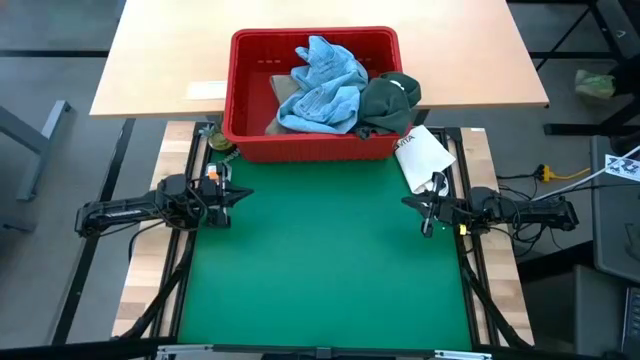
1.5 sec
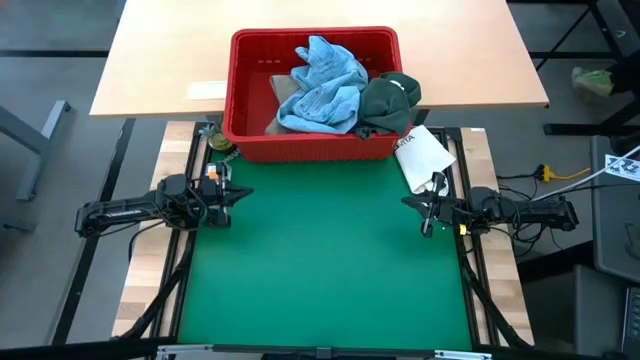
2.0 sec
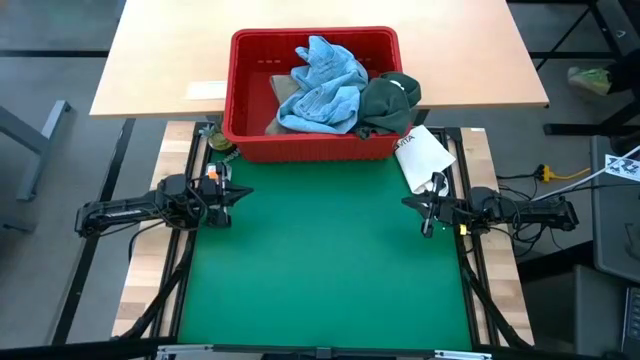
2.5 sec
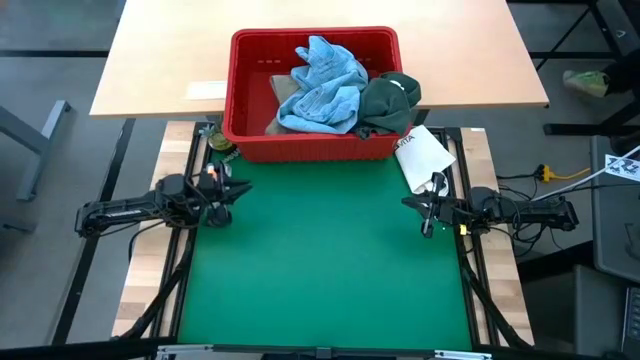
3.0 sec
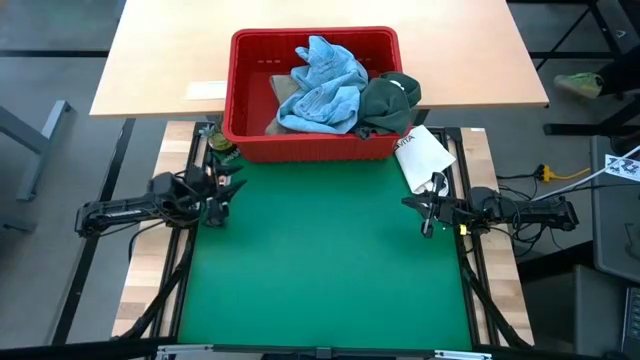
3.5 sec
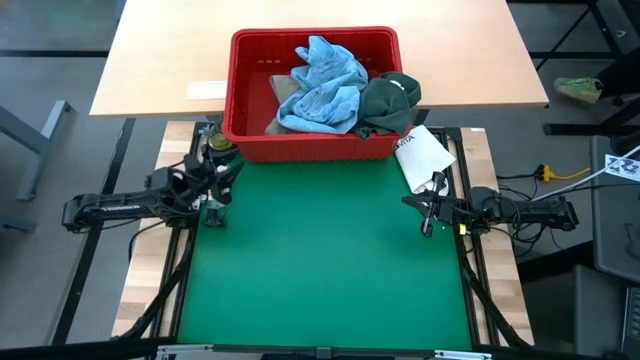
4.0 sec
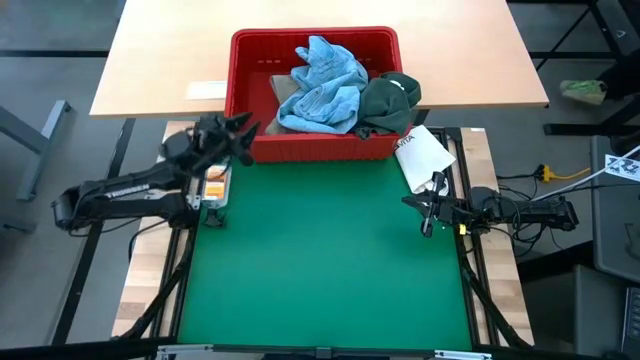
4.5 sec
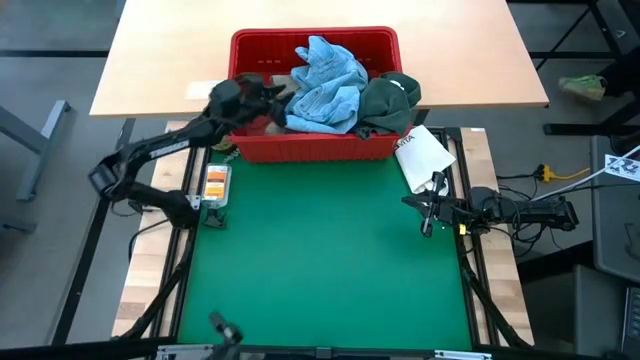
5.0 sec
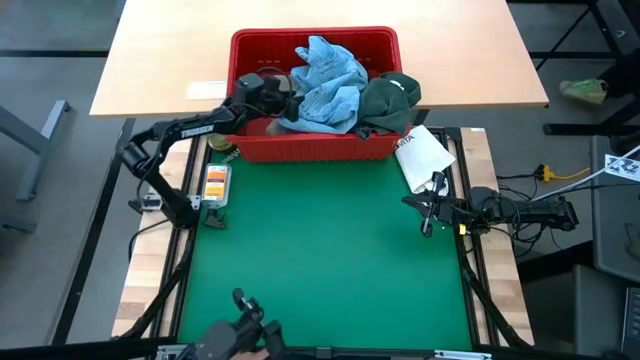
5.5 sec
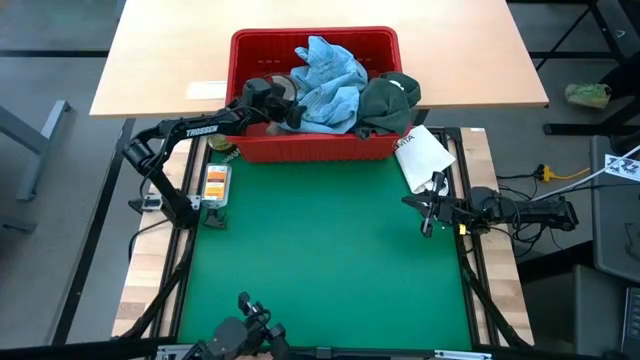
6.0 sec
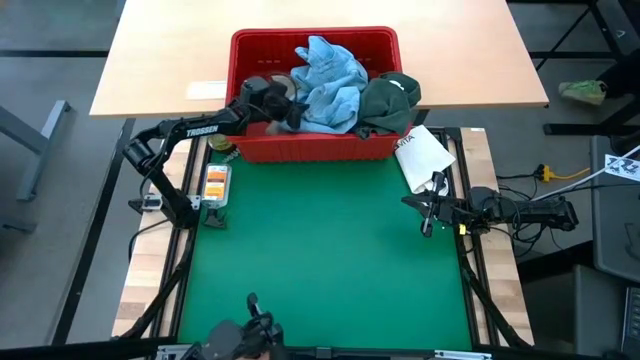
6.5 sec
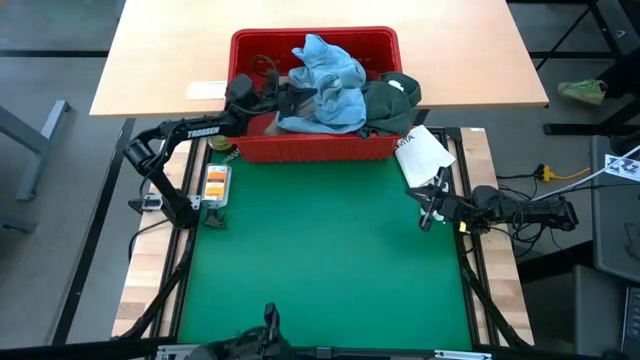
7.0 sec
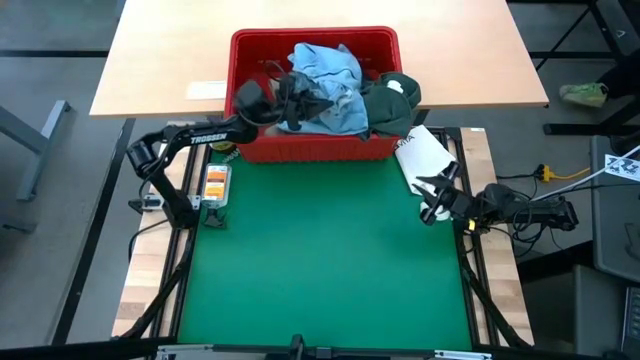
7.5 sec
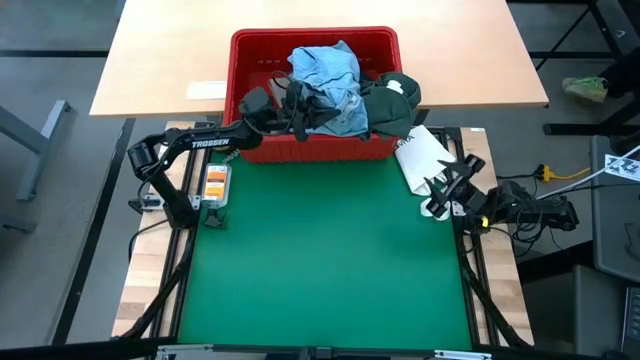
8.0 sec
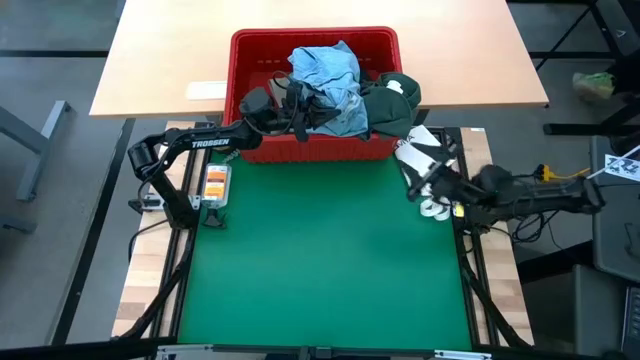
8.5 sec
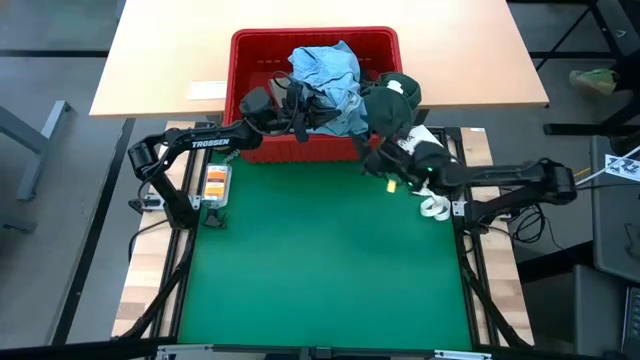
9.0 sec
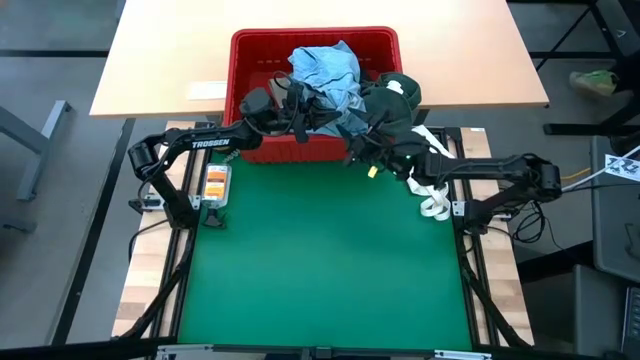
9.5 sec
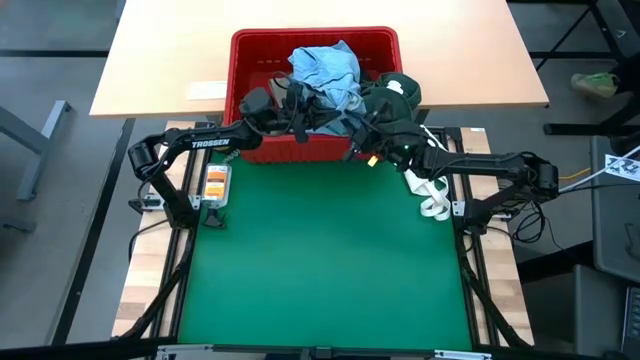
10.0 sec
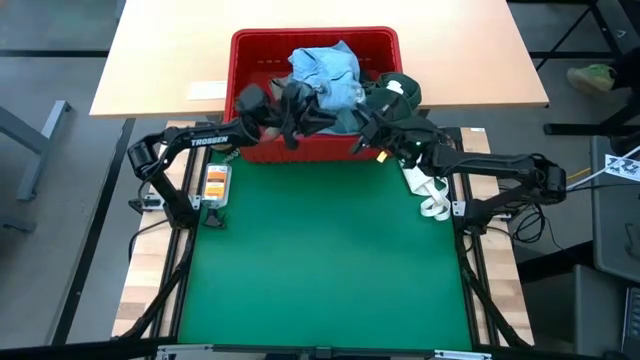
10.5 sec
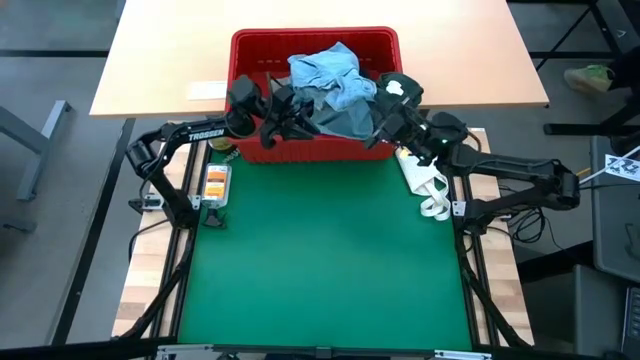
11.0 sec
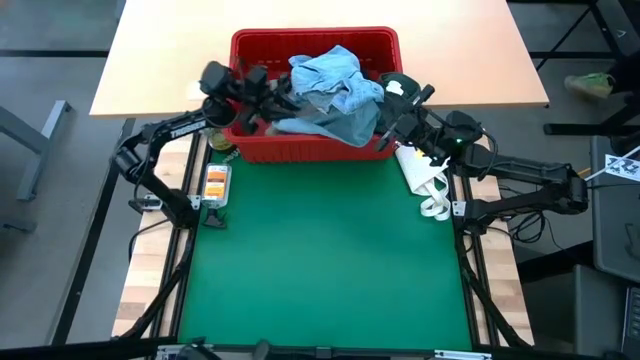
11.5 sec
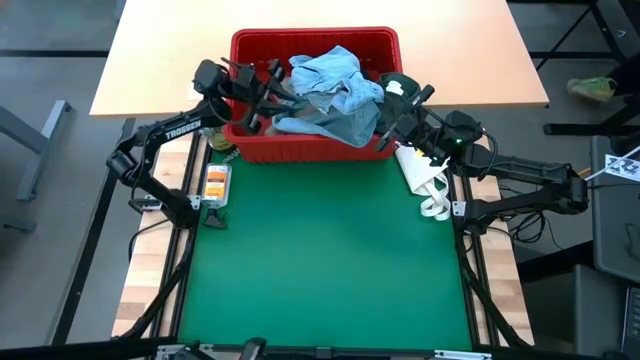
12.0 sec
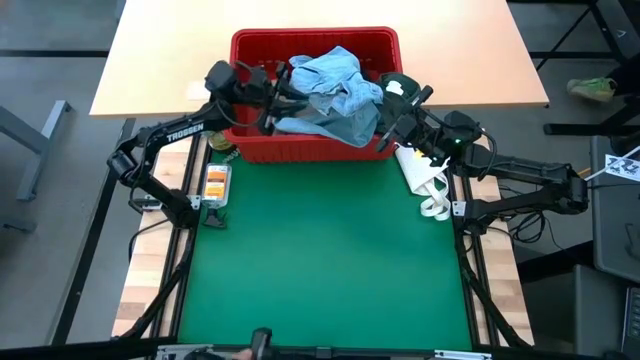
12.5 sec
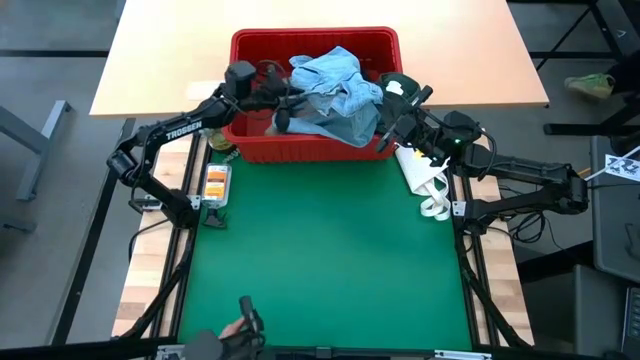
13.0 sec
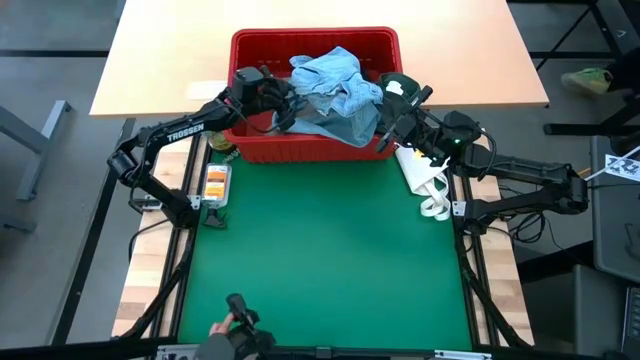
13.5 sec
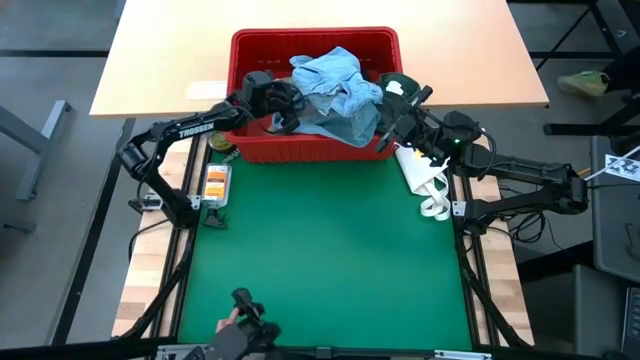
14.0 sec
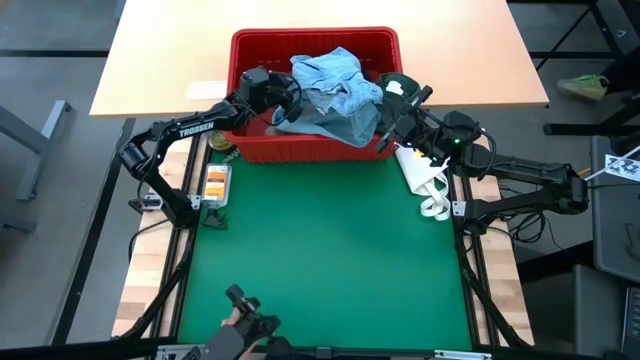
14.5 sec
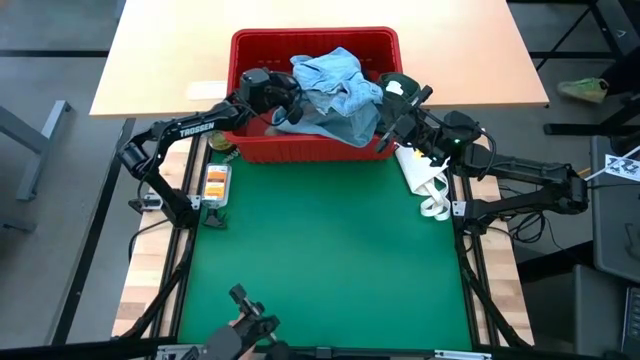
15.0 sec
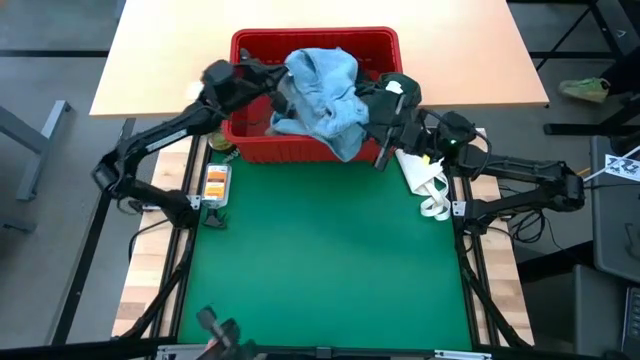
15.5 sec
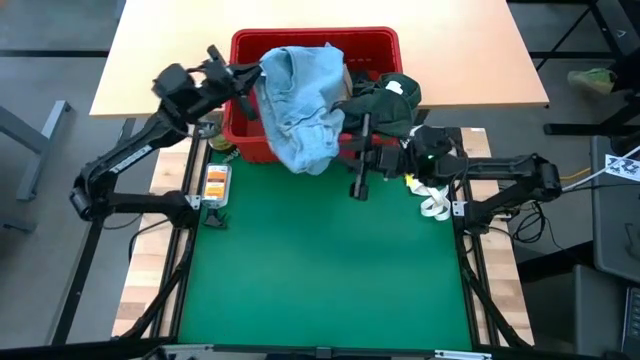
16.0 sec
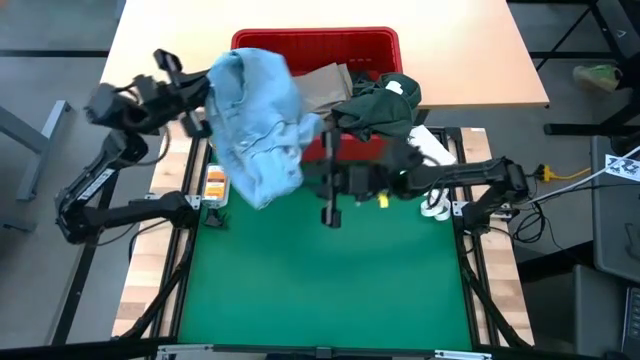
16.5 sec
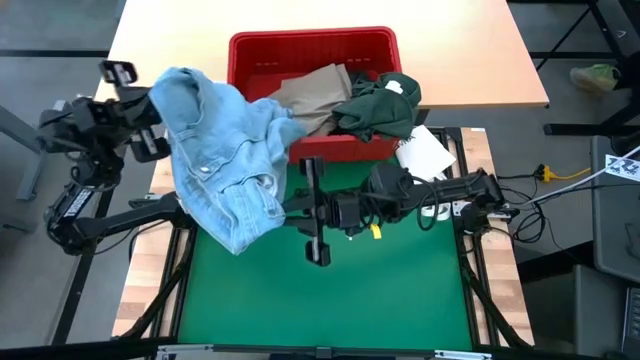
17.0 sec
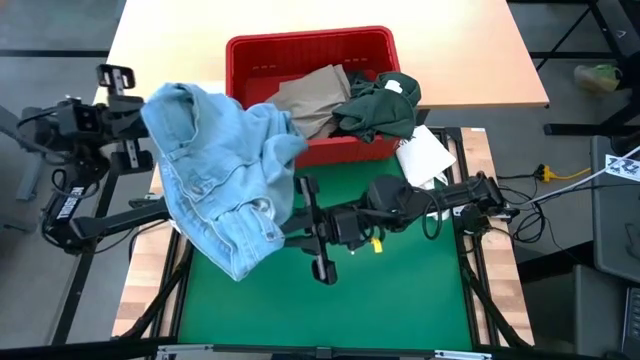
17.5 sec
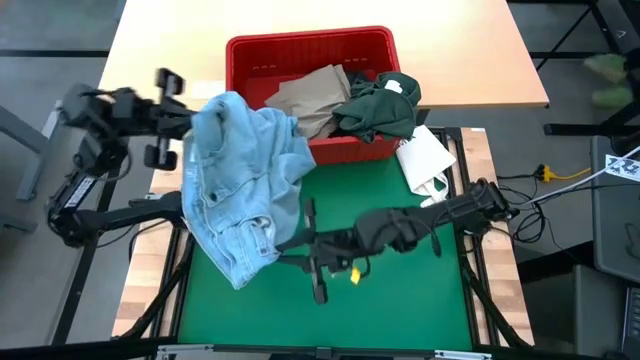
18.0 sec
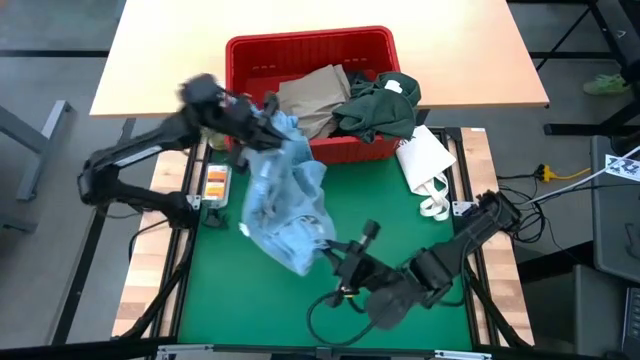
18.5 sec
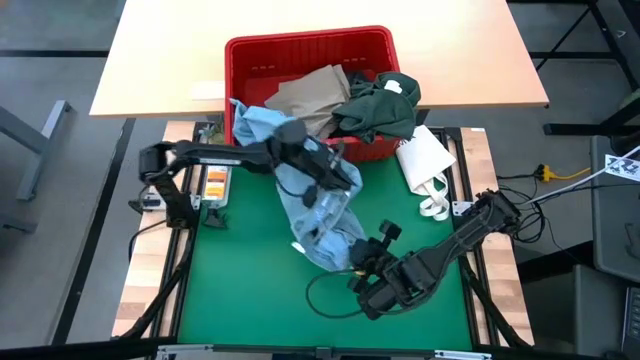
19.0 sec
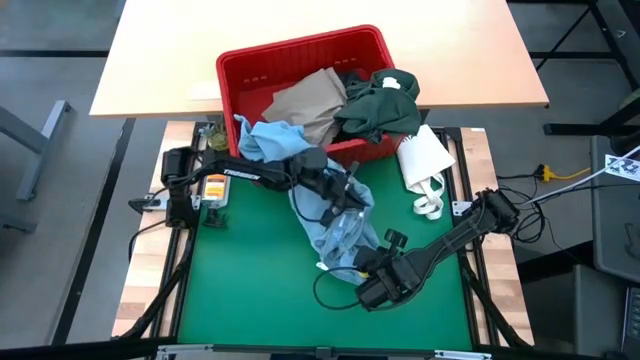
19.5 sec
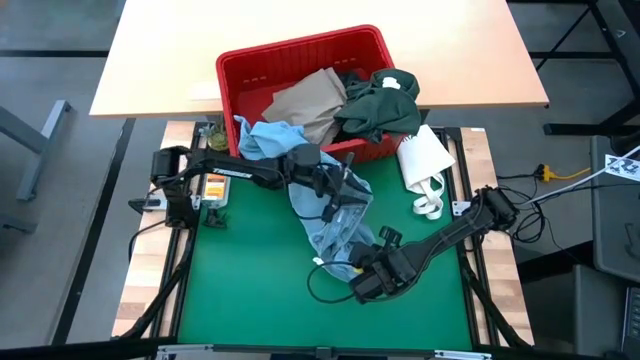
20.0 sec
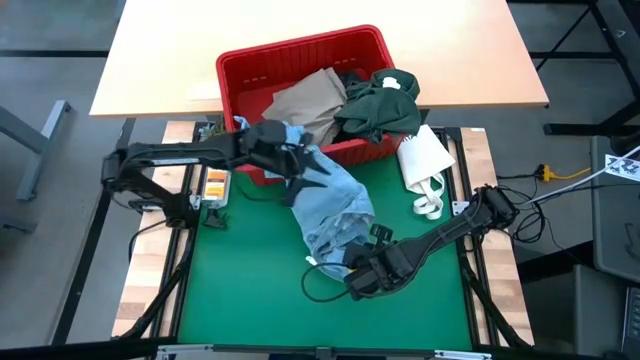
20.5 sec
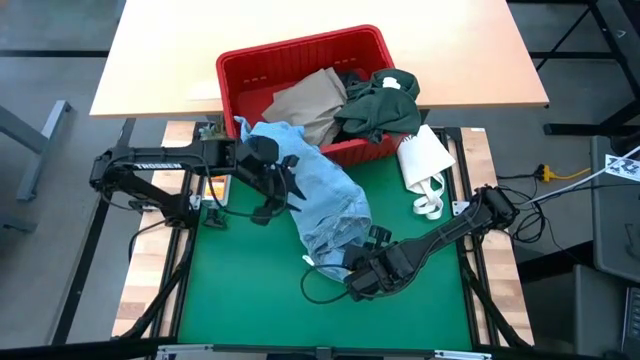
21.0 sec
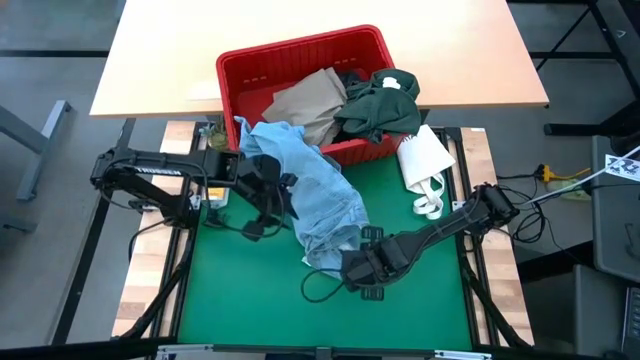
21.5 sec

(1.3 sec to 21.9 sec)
Task: Fold Laundry from Bin
Fold the blue pants
